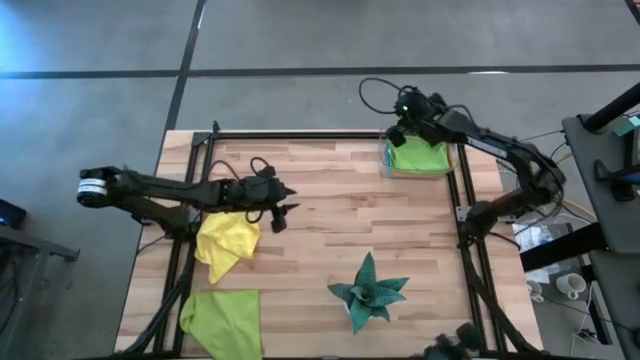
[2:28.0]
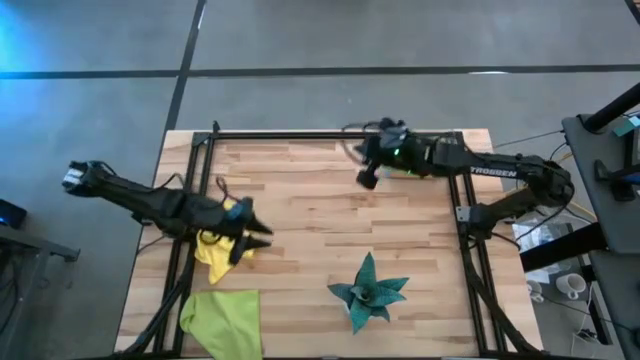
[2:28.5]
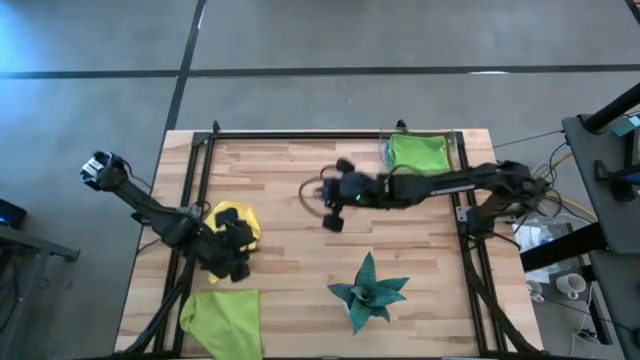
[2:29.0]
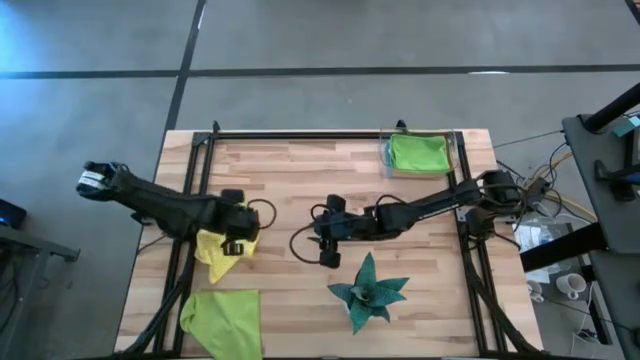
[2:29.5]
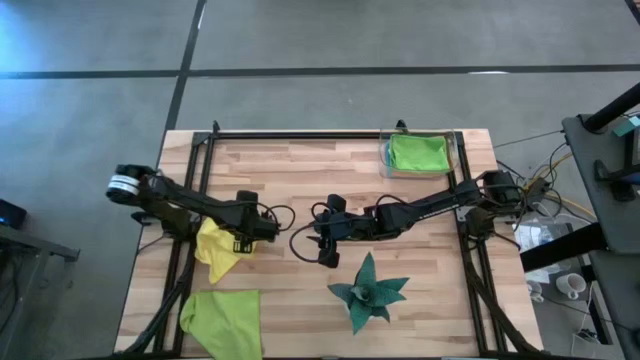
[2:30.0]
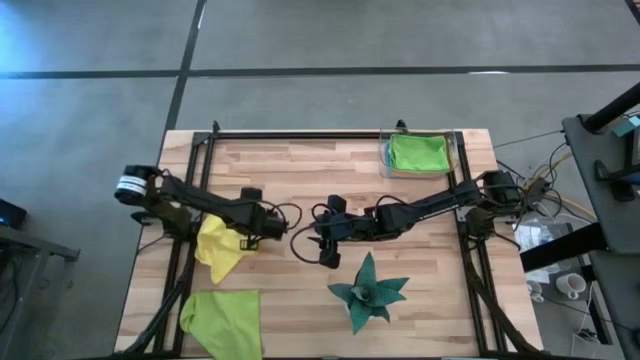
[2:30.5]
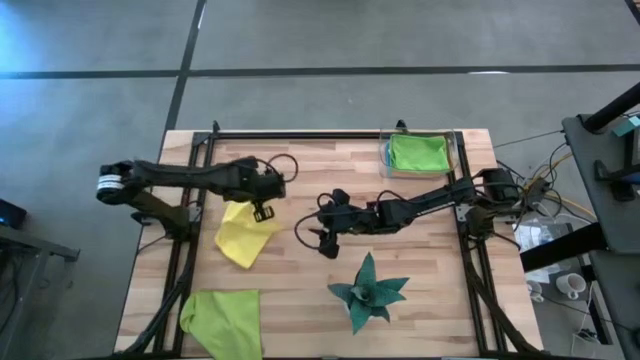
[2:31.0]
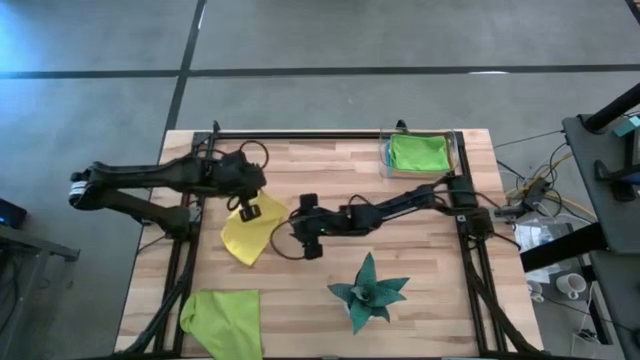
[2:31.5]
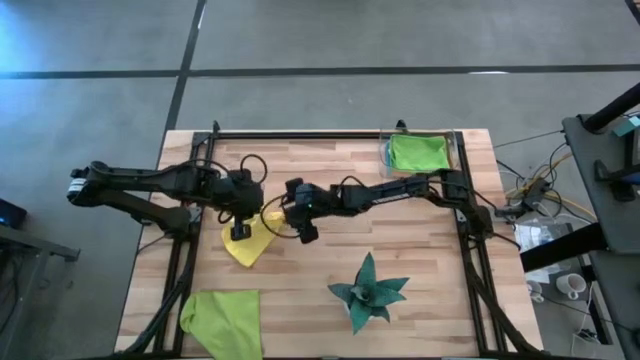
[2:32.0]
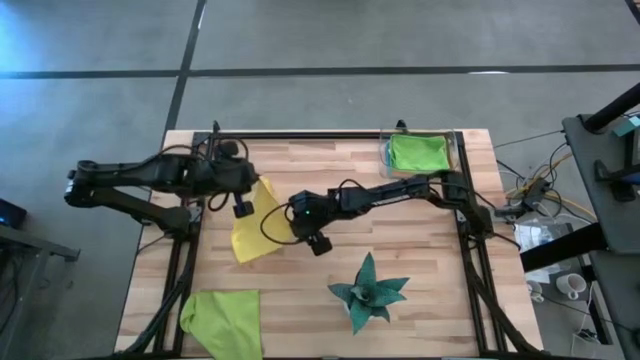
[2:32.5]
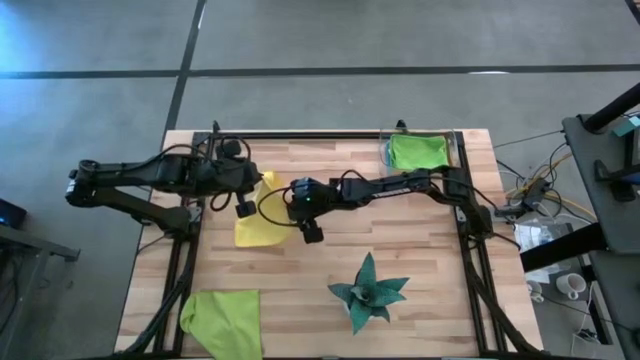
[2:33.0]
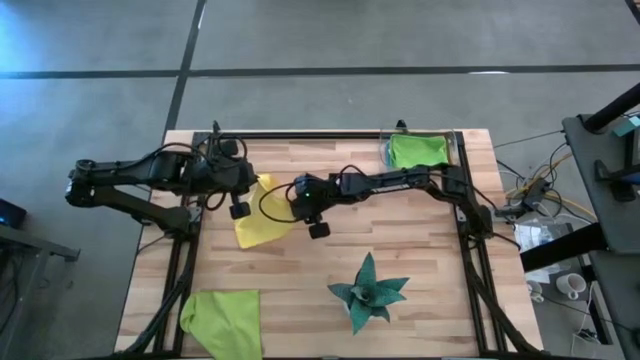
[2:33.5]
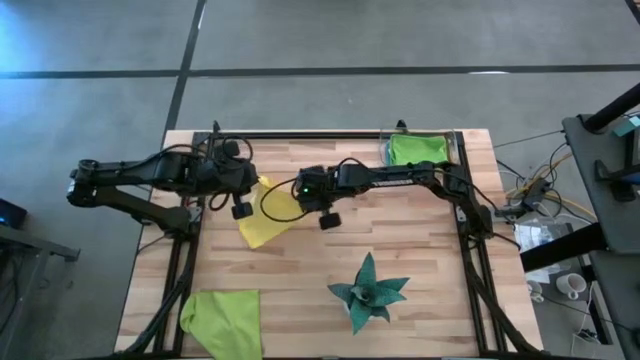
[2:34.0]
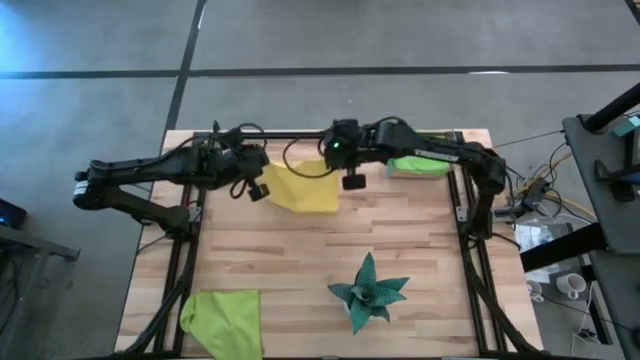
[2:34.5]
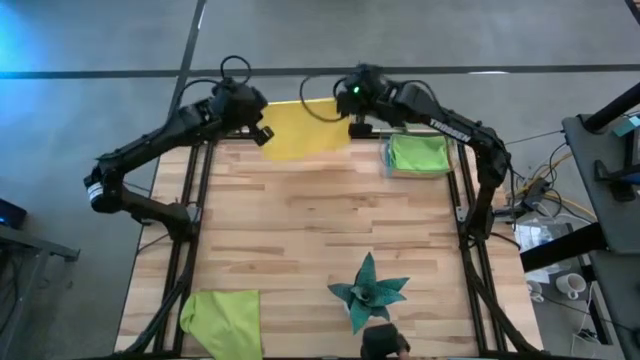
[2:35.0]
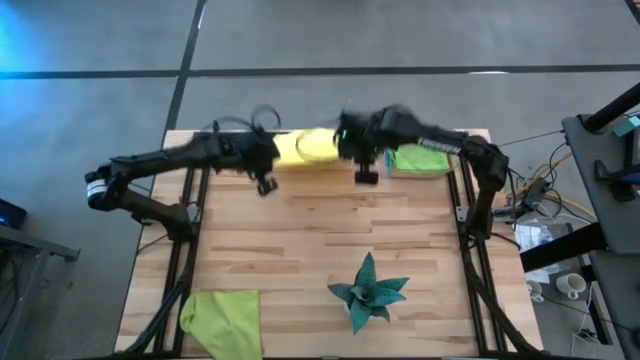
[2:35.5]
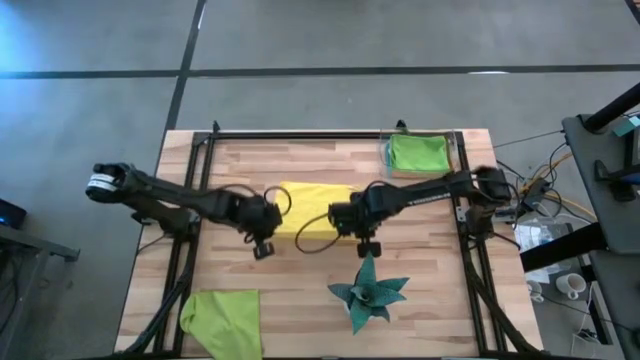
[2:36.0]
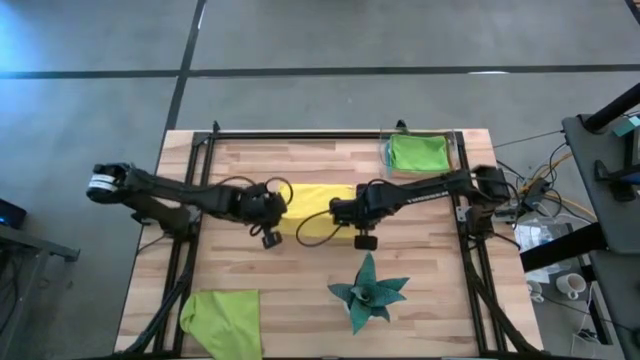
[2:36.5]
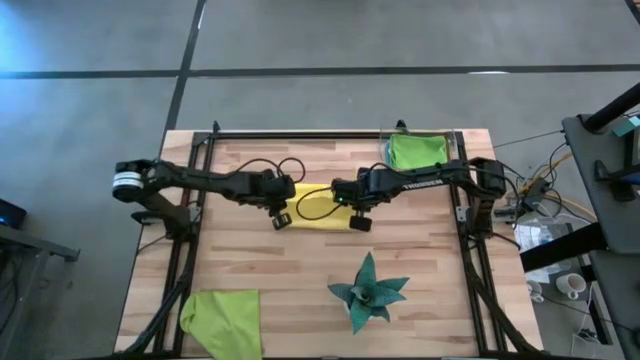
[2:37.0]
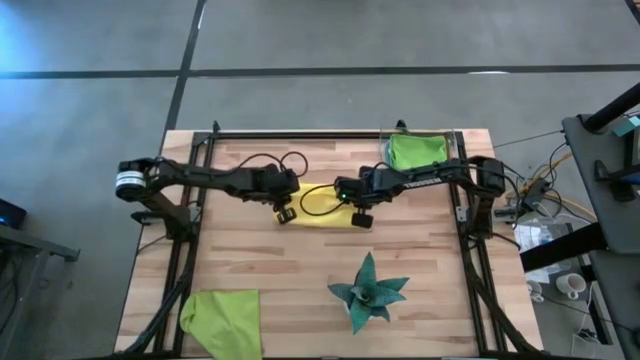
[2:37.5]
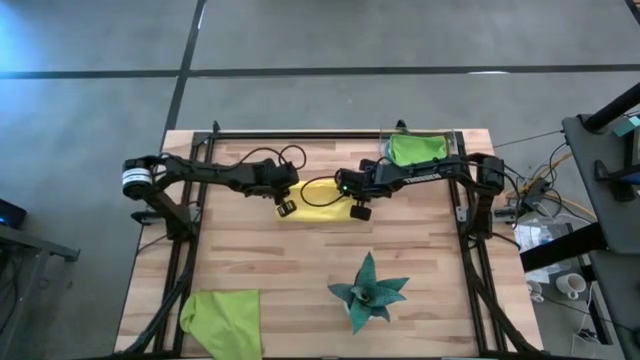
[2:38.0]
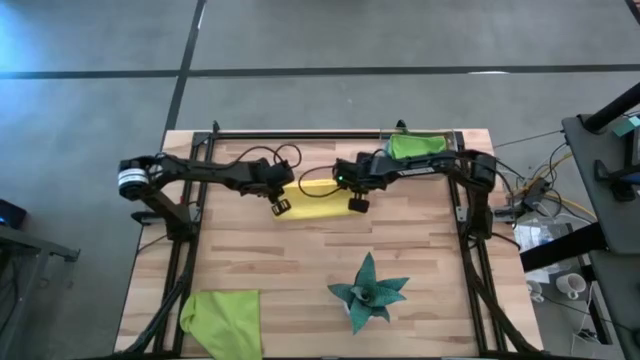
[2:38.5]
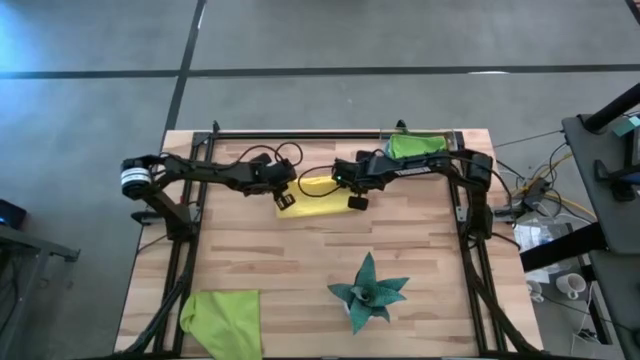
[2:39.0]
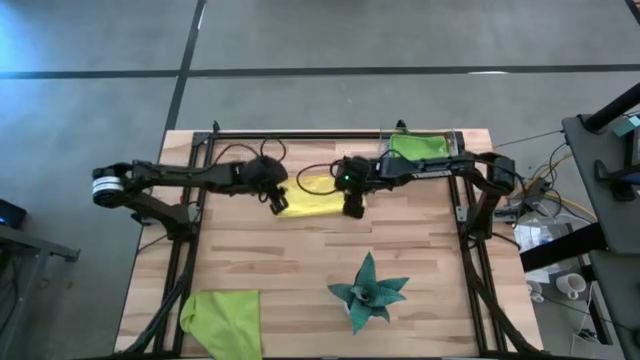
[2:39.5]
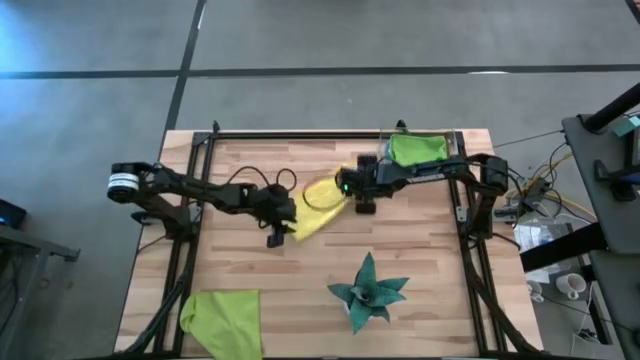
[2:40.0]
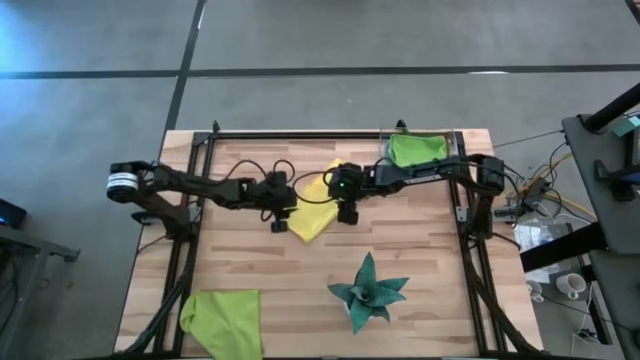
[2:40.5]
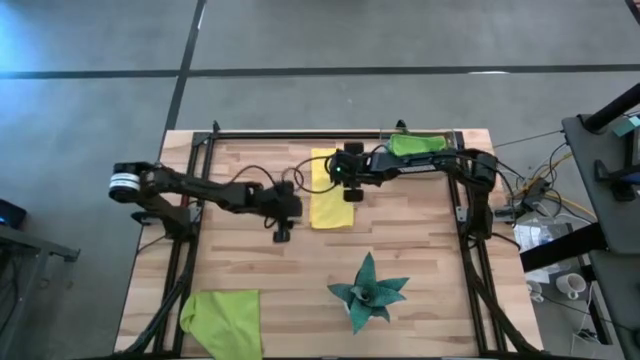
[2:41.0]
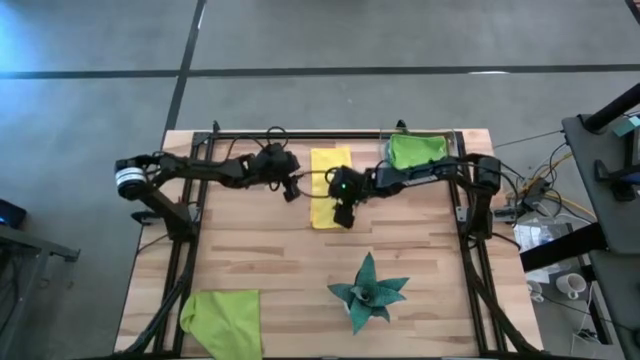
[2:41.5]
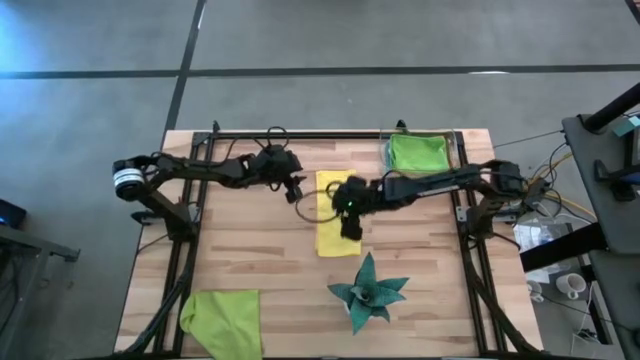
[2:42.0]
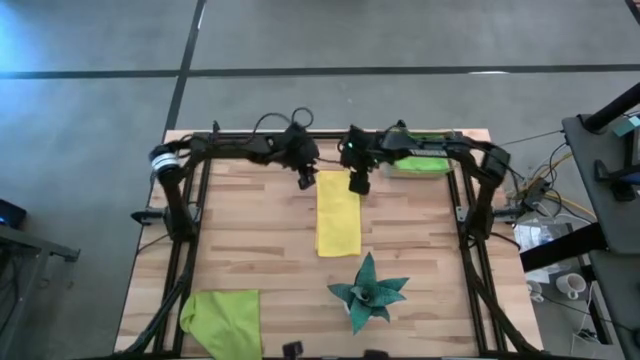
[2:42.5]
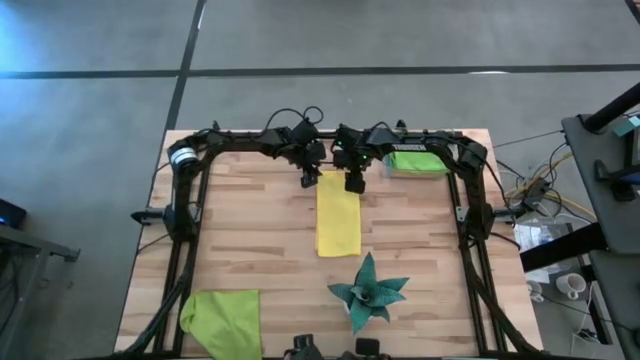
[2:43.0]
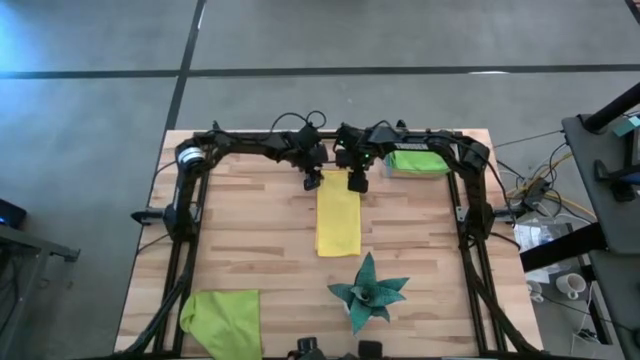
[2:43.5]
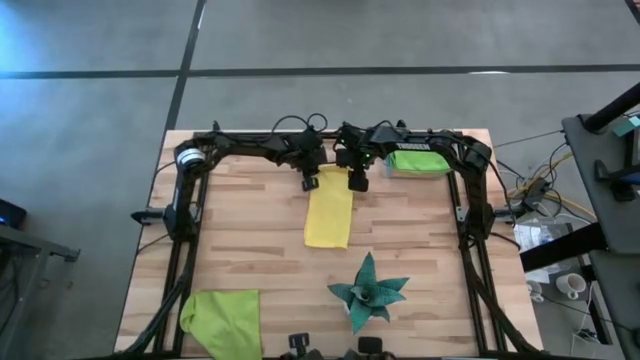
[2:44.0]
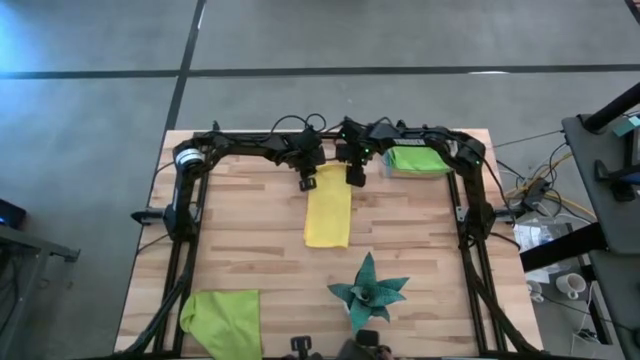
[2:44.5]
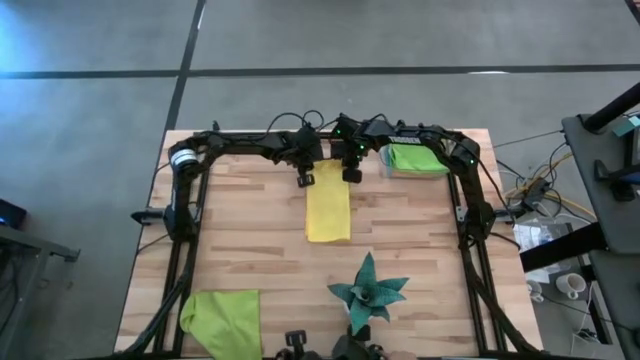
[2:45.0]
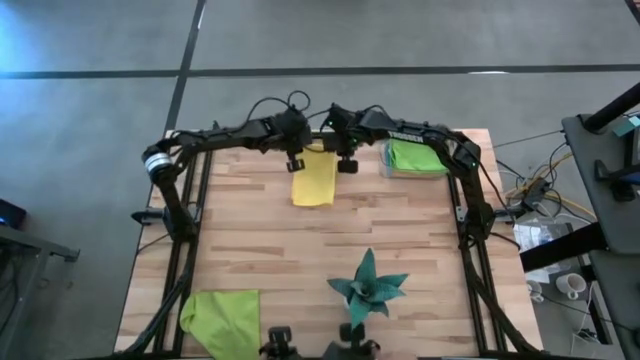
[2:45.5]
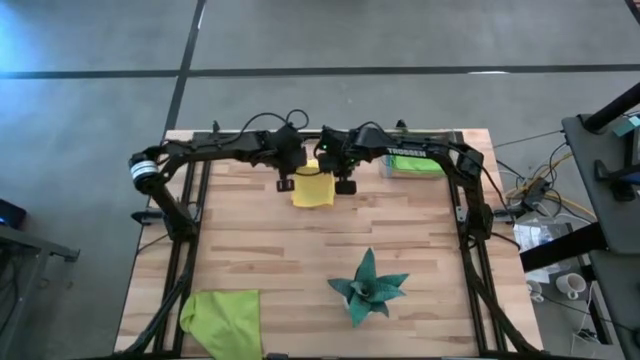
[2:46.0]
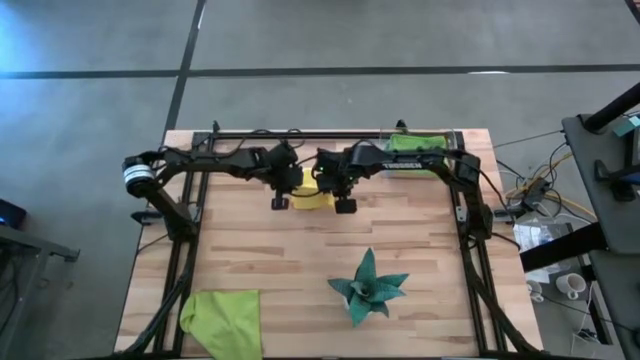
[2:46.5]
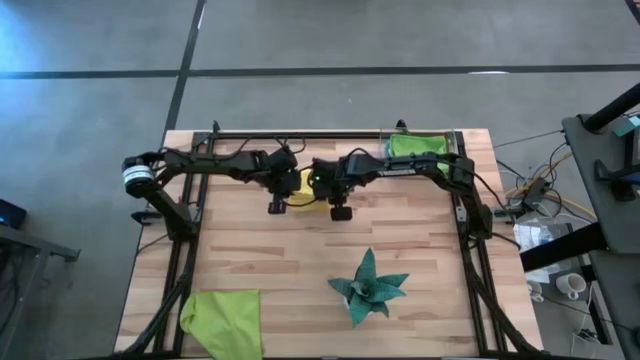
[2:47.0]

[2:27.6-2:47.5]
Task: Fold microfiber towels
Fold the yellow microfiber cloth

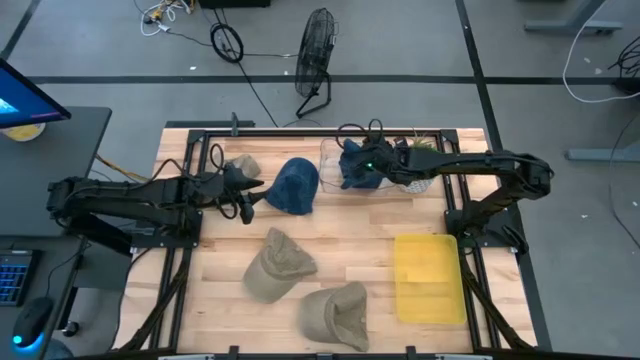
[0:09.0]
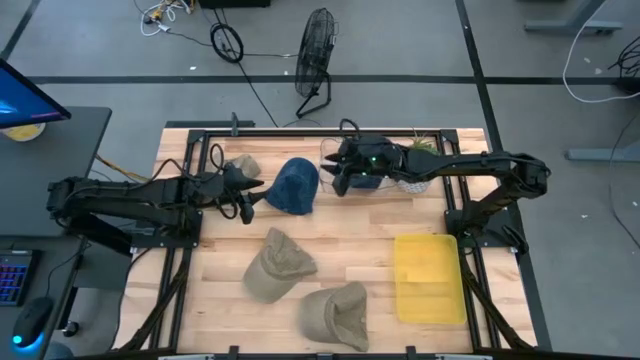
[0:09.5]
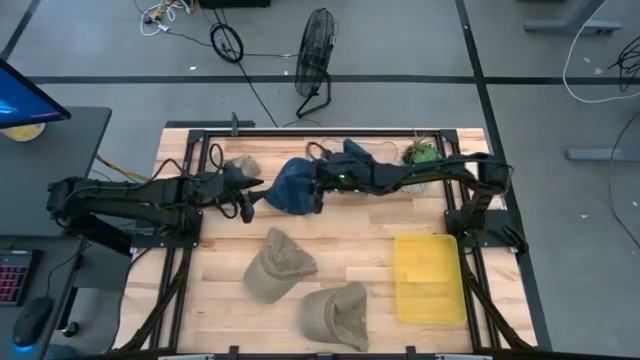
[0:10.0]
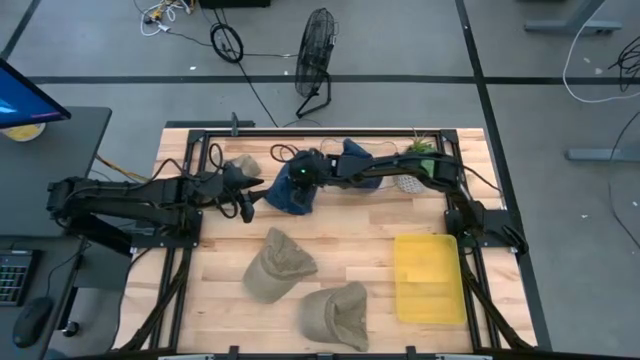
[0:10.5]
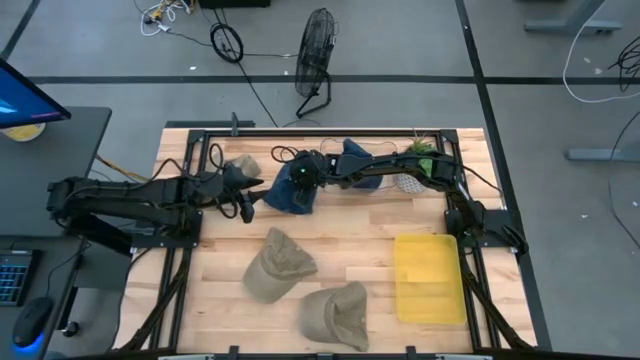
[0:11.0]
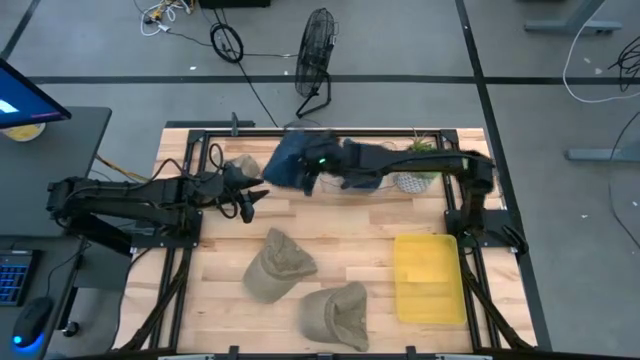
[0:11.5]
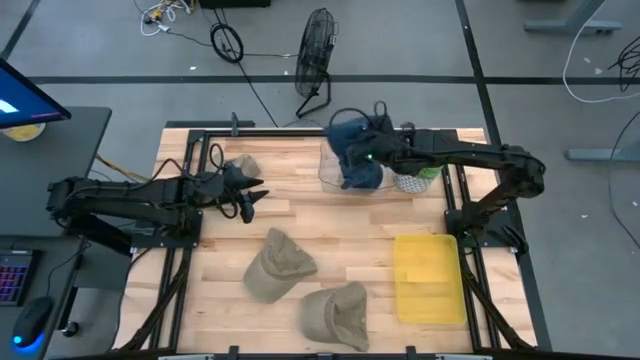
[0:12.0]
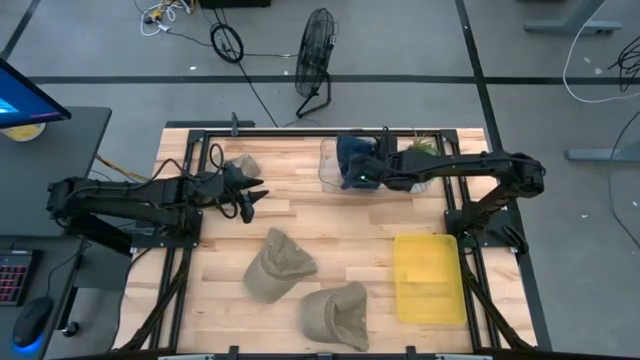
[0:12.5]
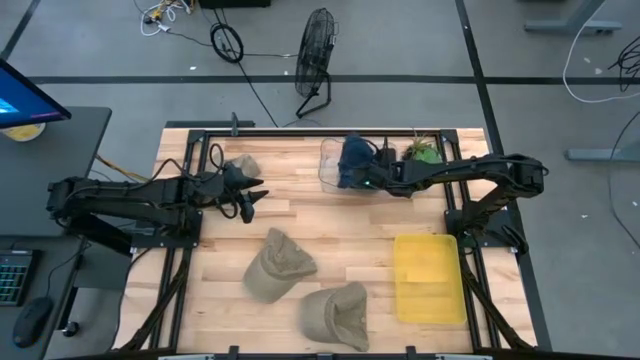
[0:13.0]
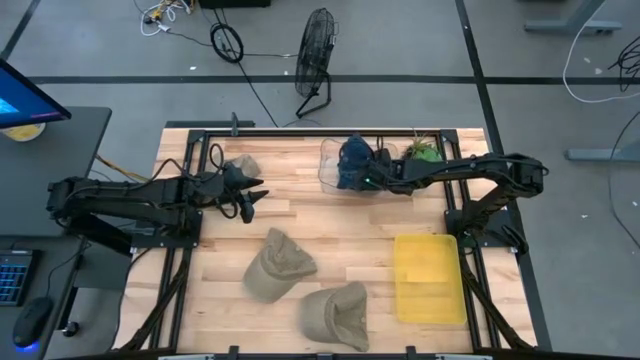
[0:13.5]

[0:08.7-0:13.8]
Task: Pick & Place hat
Put the blue cap into the transparent bin
